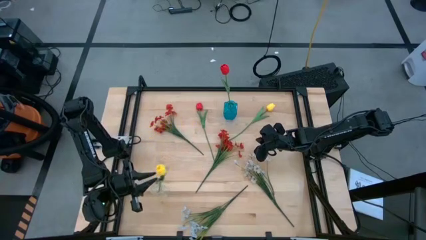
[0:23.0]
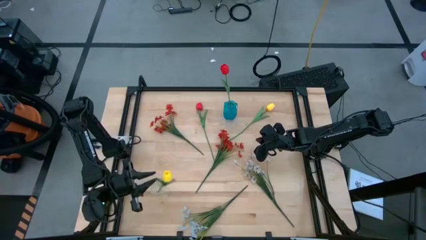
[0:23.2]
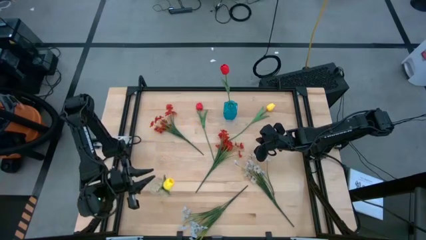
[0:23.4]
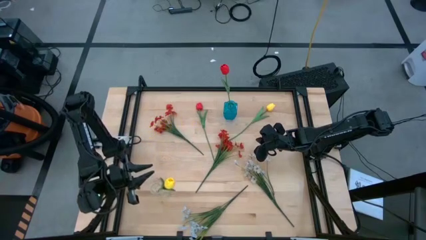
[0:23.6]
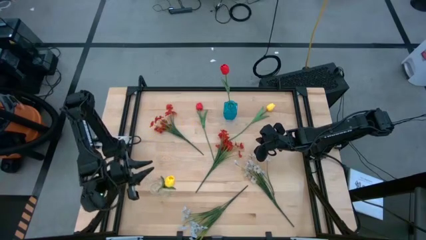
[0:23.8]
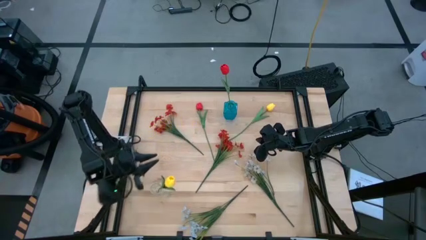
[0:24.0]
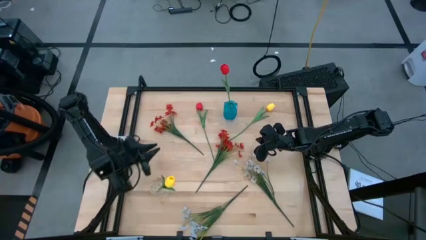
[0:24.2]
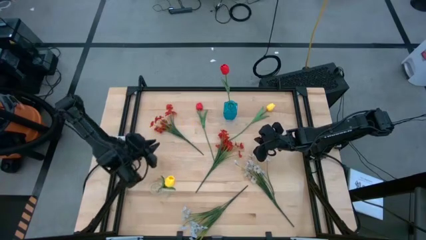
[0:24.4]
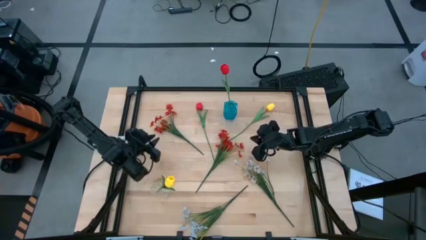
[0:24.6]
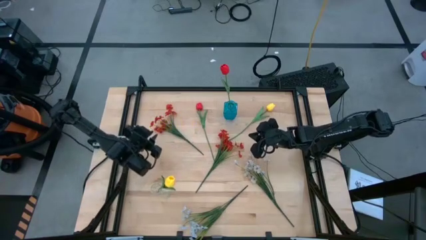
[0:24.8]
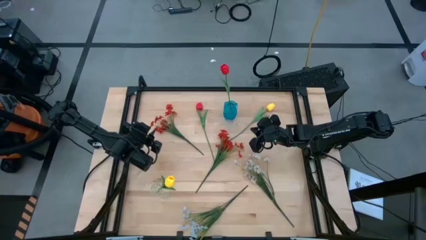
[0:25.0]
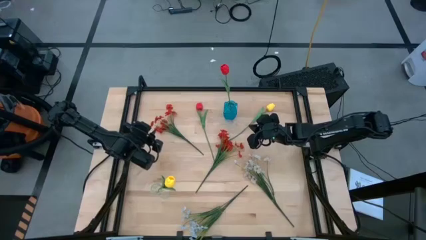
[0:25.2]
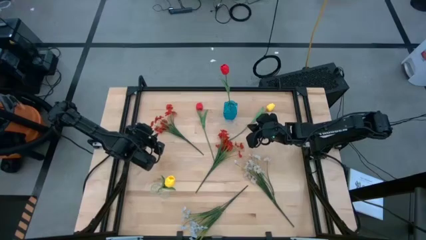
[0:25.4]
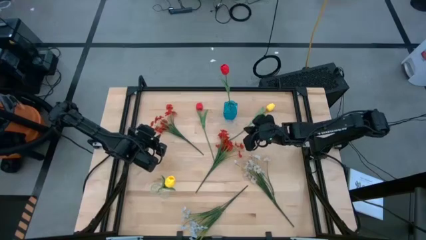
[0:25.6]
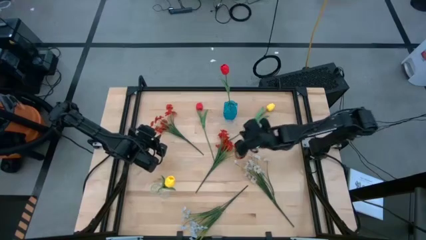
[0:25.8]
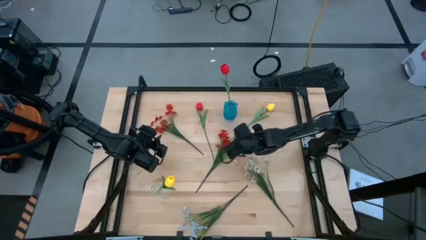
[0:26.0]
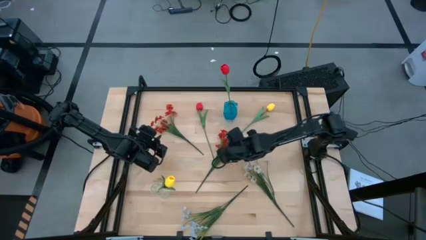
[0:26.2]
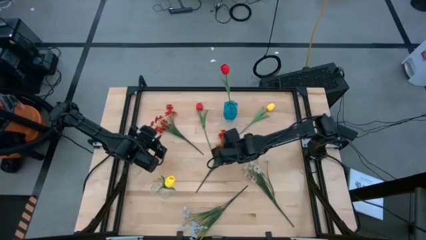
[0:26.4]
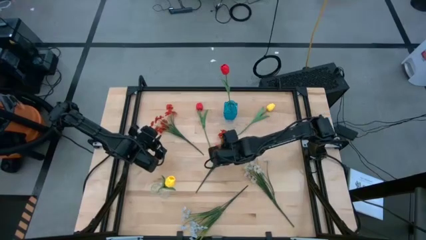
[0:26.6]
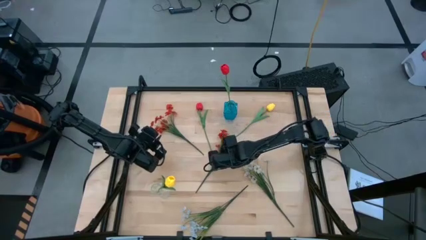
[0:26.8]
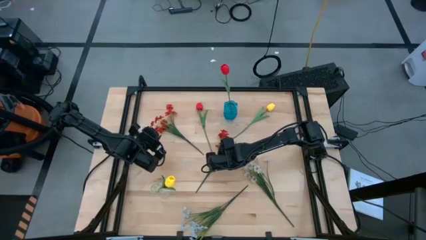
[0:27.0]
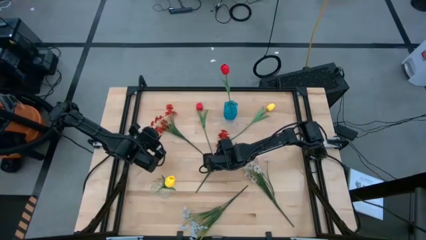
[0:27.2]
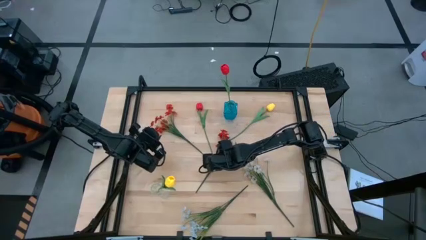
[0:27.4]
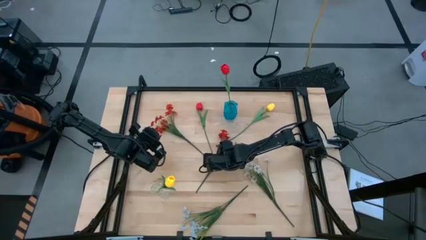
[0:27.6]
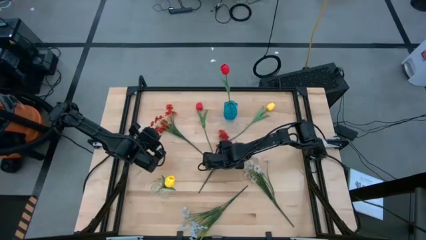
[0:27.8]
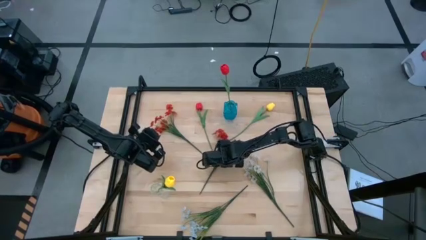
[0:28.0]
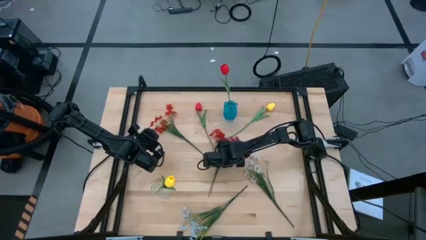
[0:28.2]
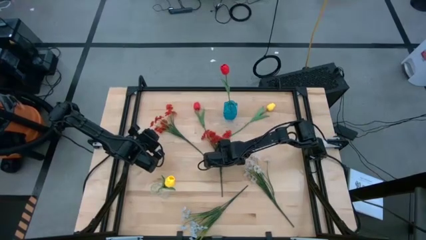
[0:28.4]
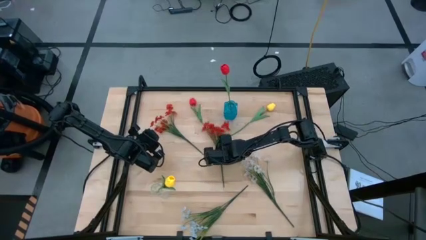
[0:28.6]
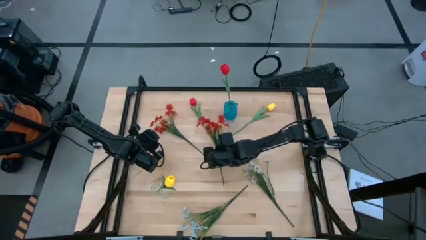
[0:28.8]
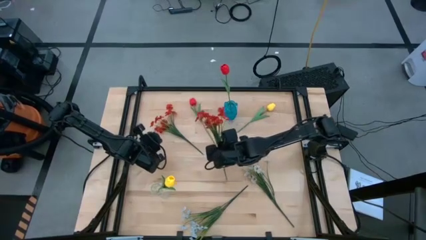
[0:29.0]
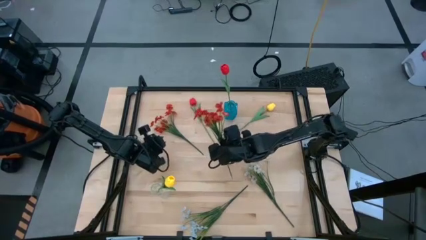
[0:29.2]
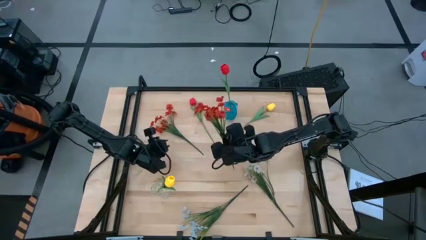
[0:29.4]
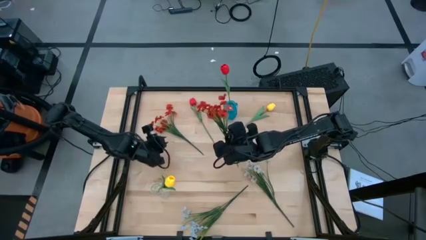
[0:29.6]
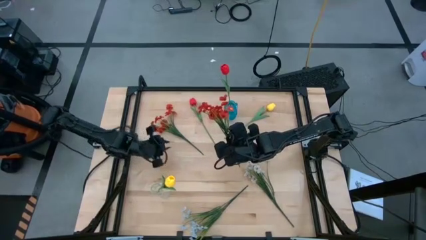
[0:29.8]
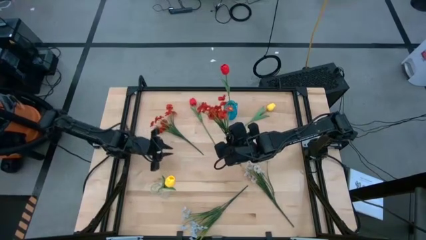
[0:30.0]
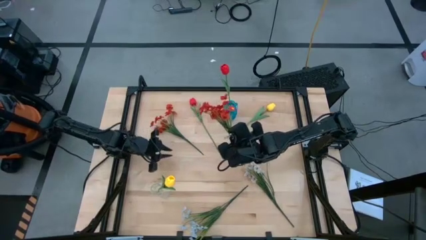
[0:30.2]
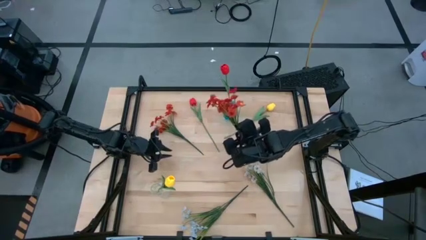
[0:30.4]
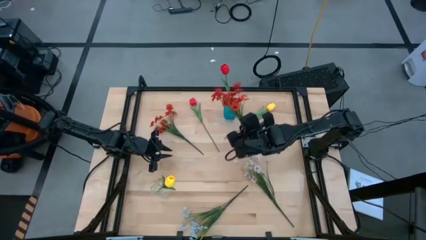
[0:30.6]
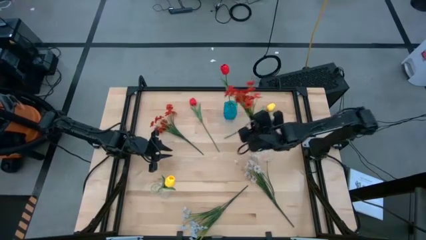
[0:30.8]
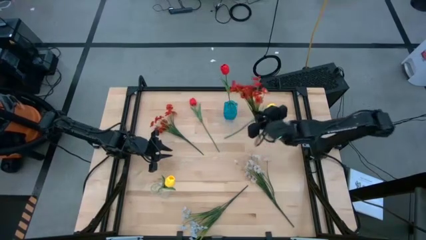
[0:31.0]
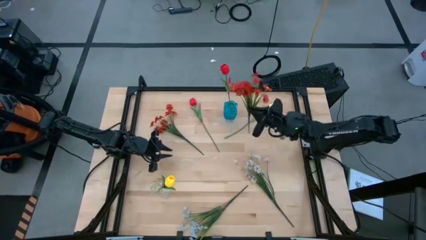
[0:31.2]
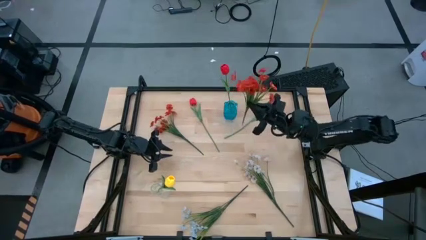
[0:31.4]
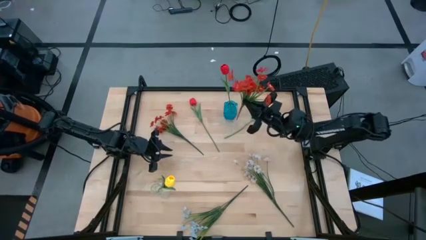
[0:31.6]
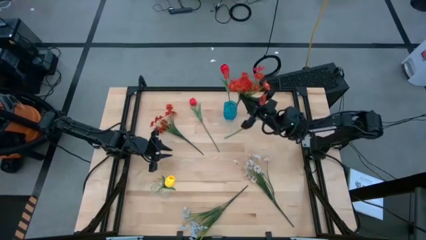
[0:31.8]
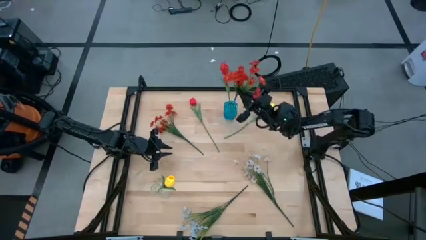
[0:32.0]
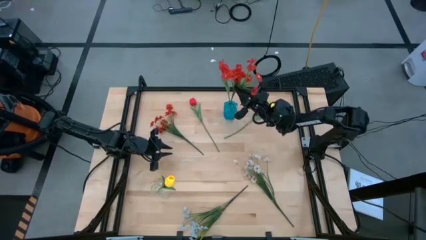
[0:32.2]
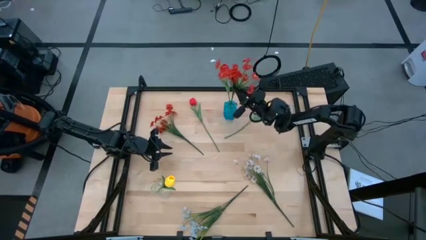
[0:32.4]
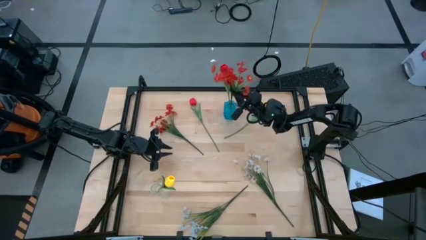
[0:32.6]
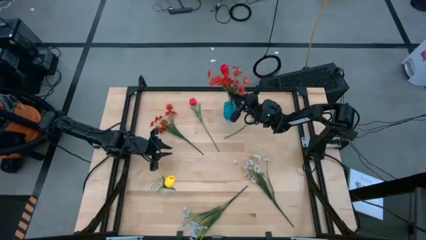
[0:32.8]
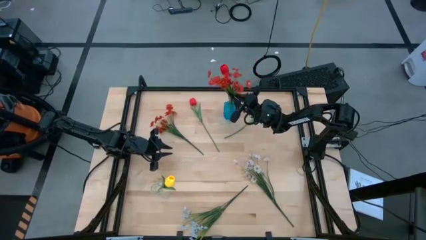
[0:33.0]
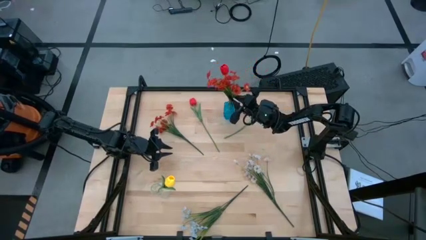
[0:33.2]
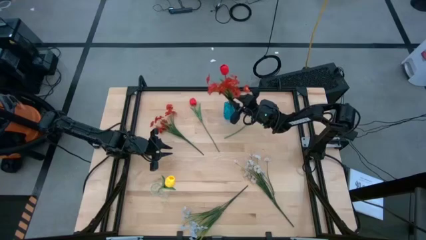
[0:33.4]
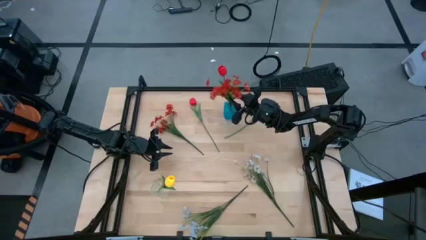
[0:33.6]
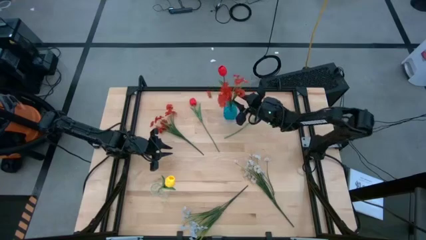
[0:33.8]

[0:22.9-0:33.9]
Task: Sort flowers into vase by color
Put the bottom orange flowers into the blue vase

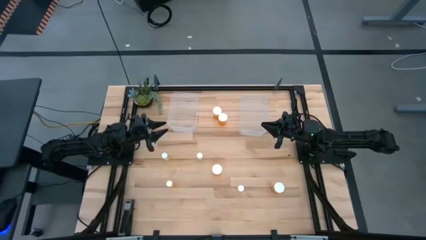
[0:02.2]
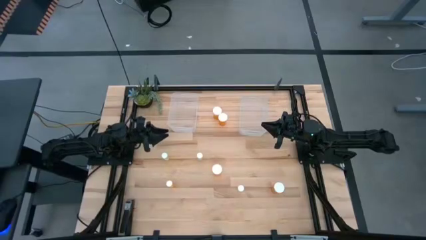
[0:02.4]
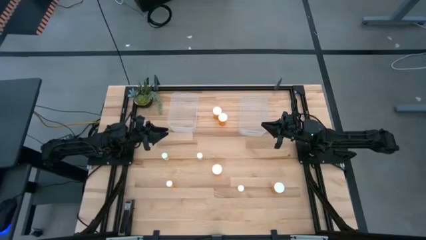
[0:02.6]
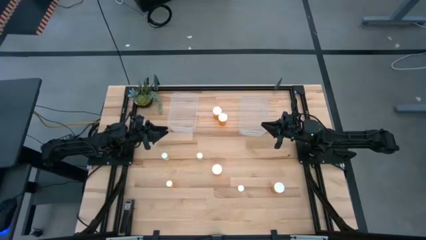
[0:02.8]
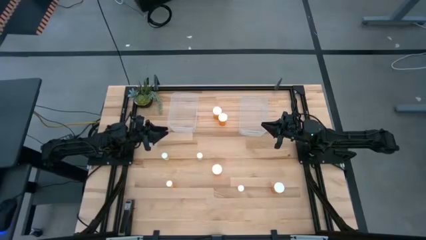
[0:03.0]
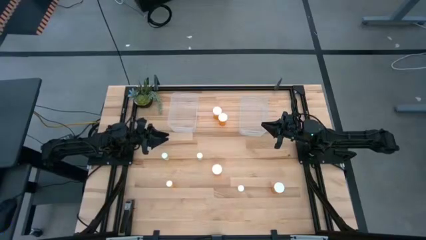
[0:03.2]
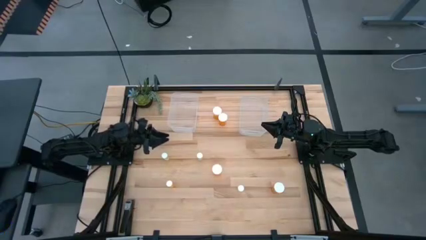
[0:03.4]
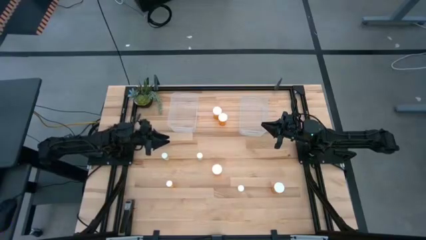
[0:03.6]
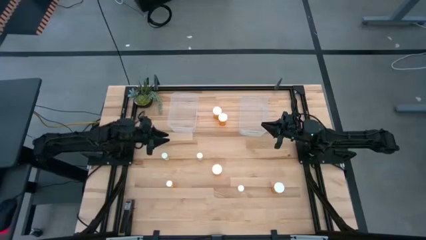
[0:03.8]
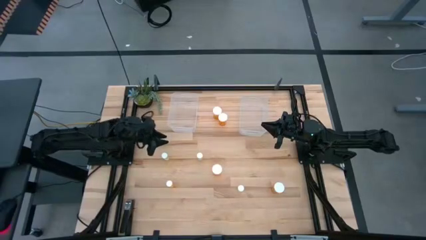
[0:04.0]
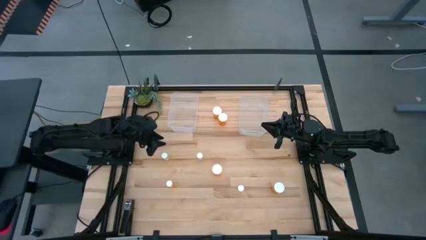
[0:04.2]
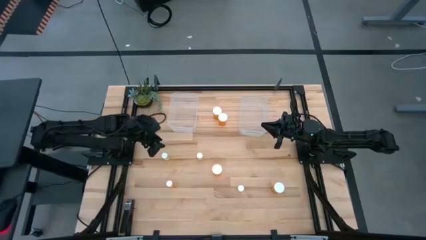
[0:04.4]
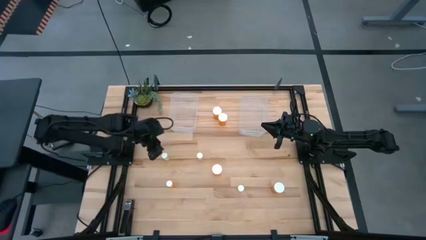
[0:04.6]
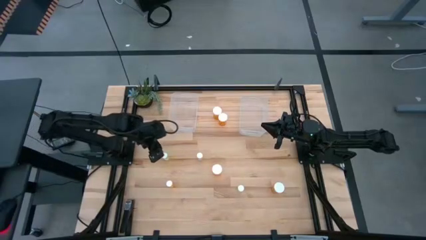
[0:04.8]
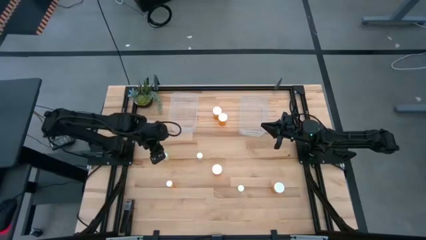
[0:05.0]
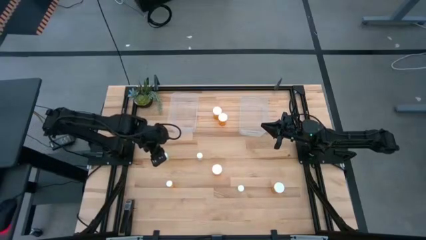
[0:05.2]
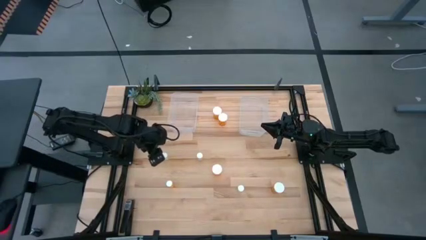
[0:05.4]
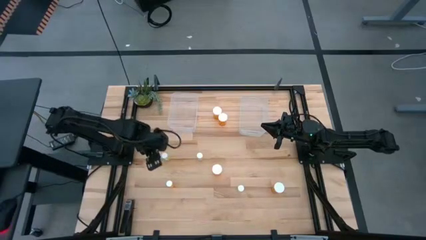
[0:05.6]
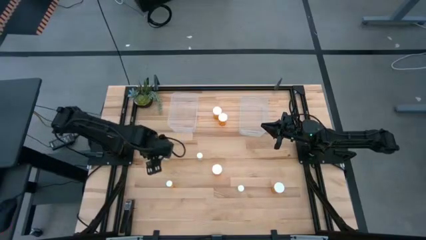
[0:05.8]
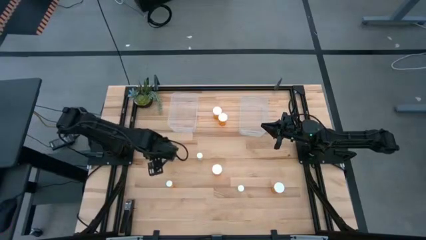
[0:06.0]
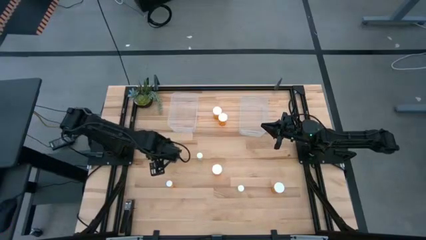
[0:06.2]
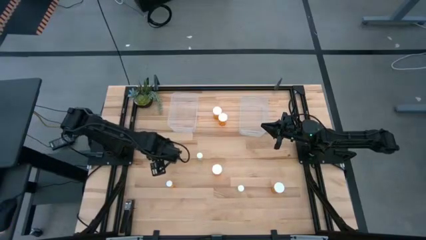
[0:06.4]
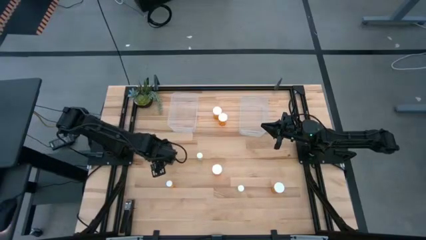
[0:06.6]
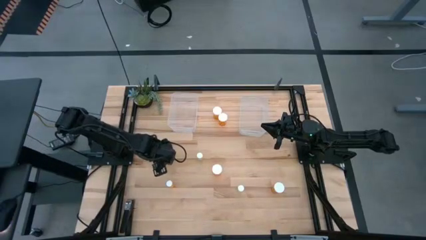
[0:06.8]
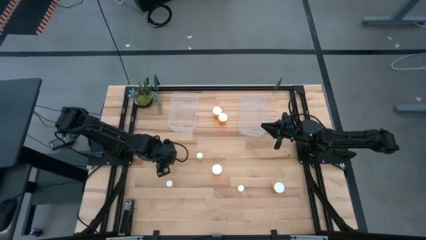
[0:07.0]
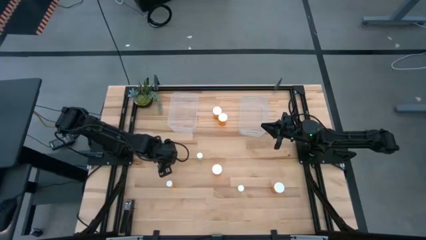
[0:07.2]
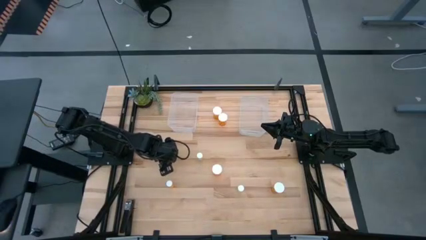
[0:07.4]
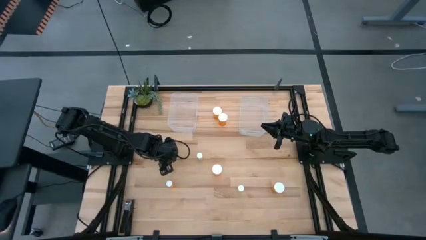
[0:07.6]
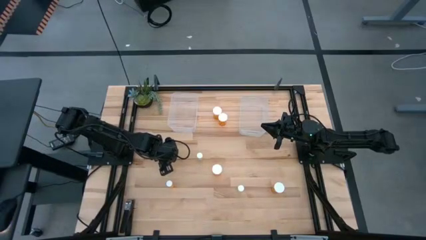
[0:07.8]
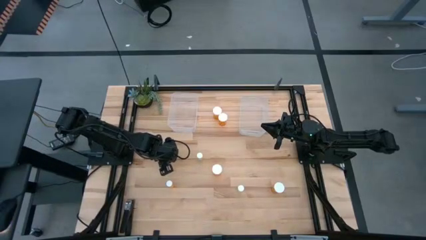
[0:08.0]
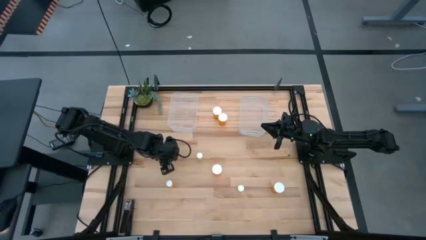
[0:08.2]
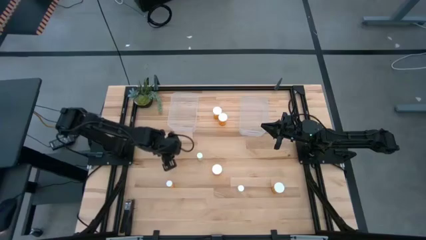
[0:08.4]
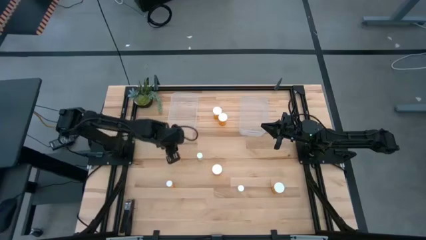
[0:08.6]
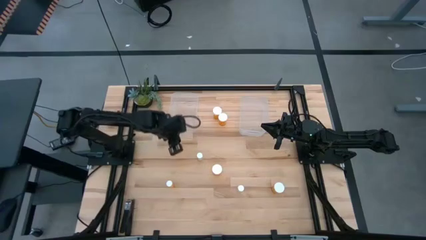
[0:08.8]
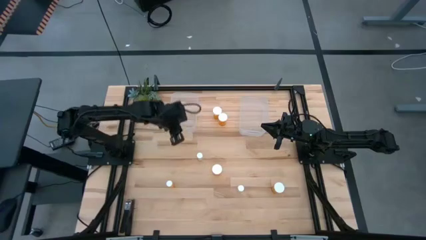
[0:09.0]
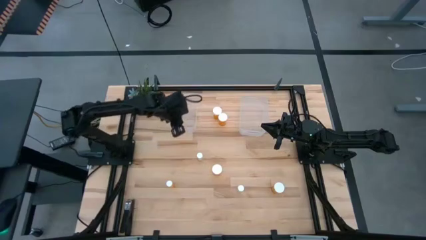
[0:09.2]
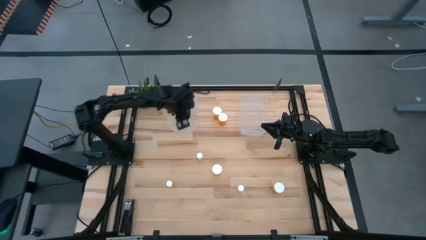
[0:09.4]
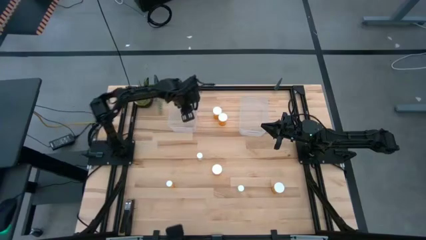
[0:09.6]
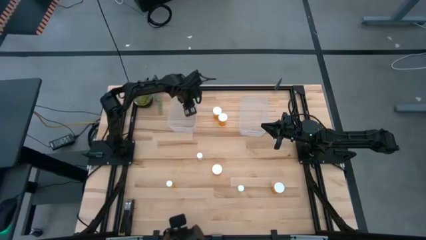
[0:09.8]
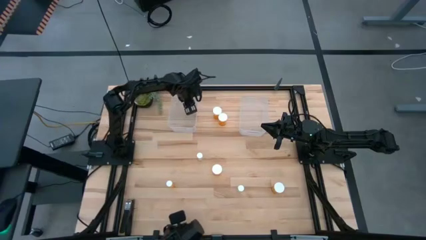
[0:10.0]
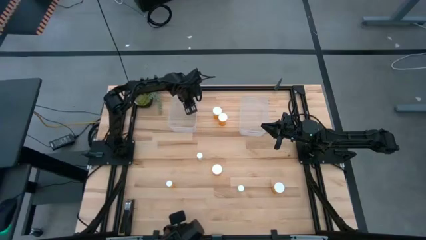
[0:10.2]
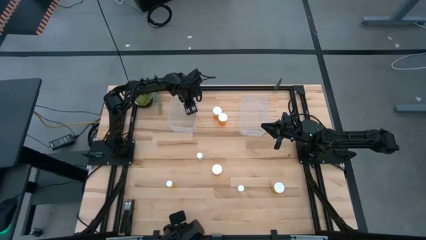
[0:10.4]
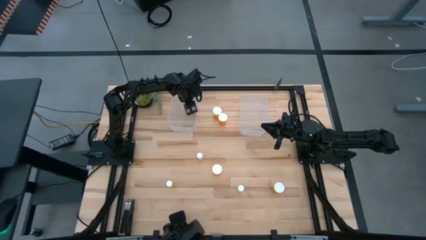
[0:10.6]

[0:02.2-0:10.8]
Task: Pick and place medicine bottles into bin by pill shape (circle, oval)
Put the left small yellow pill bottle into the left transparent bin
